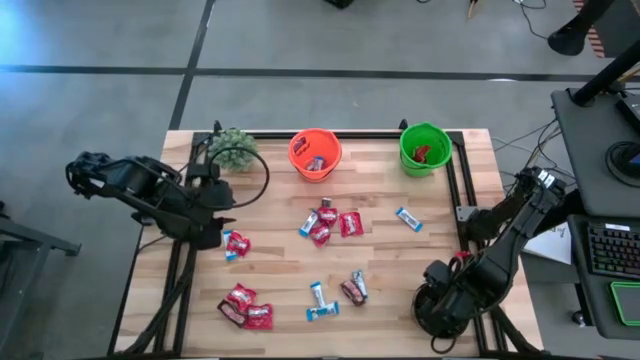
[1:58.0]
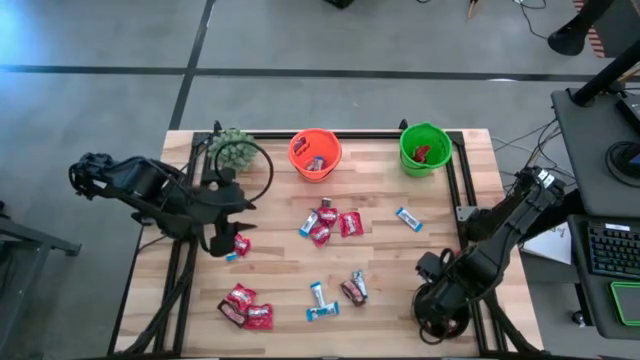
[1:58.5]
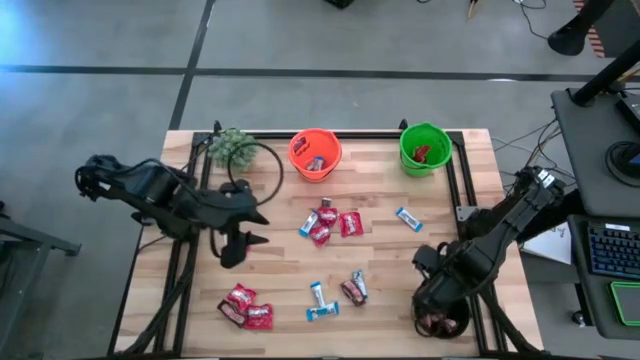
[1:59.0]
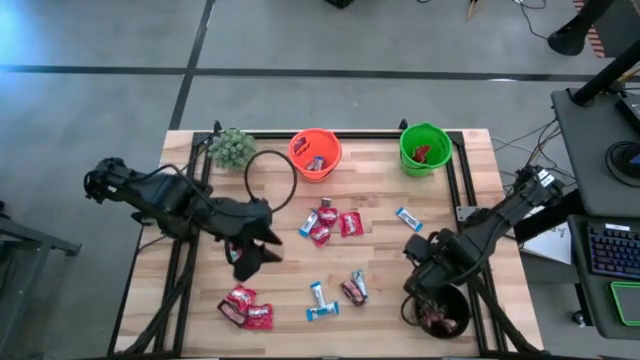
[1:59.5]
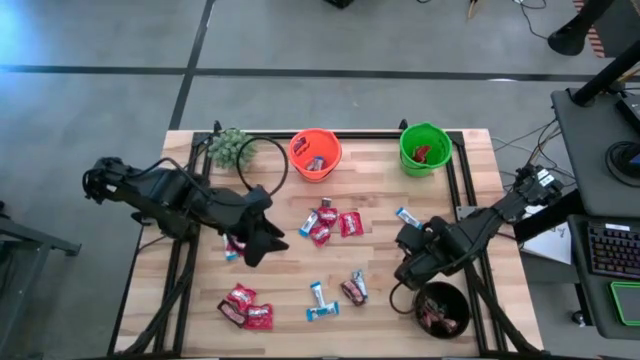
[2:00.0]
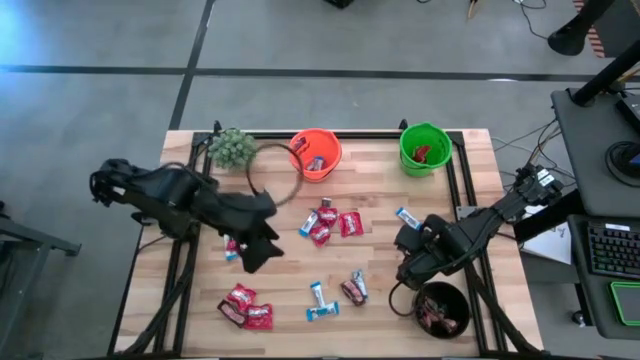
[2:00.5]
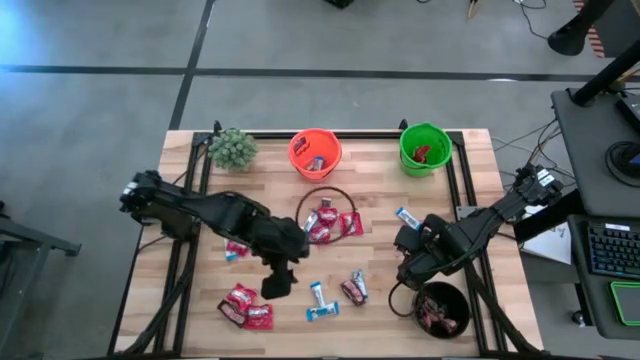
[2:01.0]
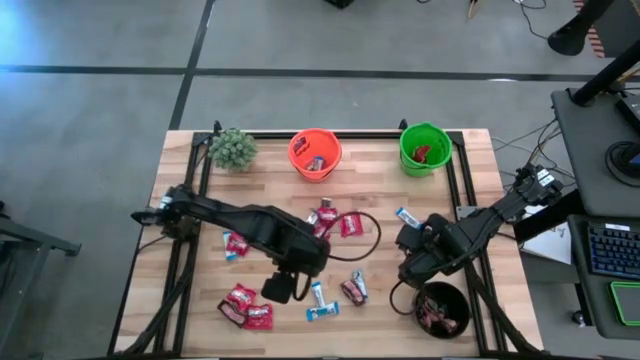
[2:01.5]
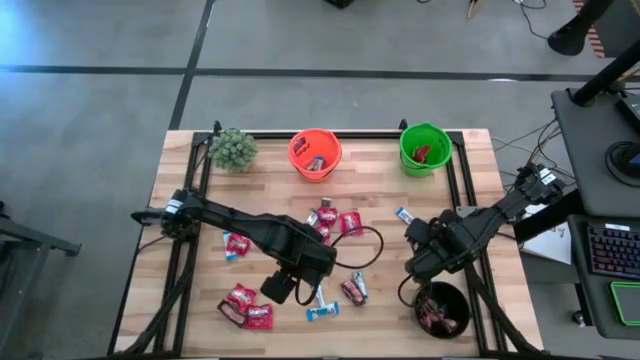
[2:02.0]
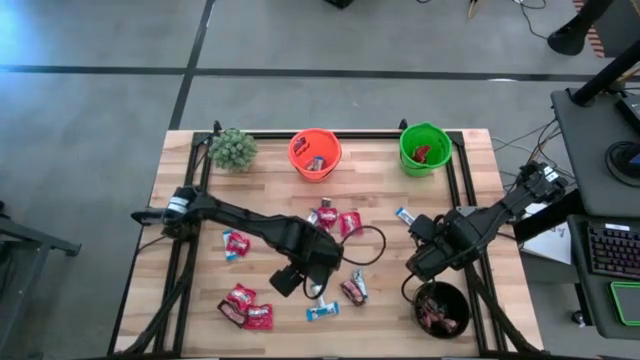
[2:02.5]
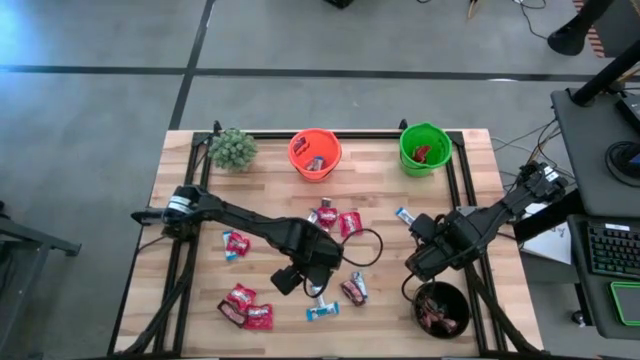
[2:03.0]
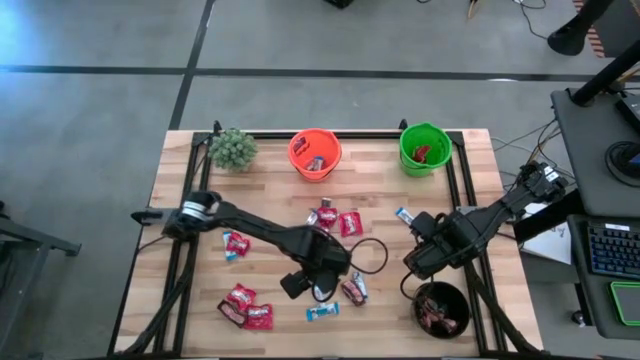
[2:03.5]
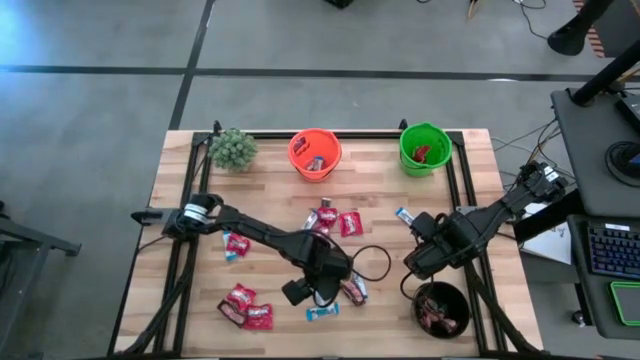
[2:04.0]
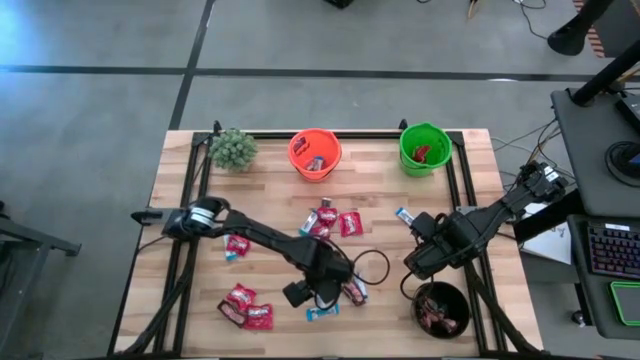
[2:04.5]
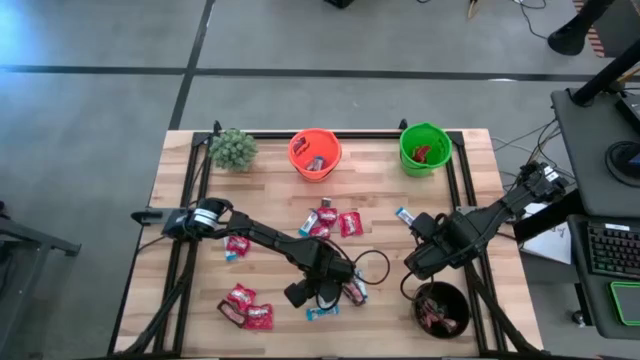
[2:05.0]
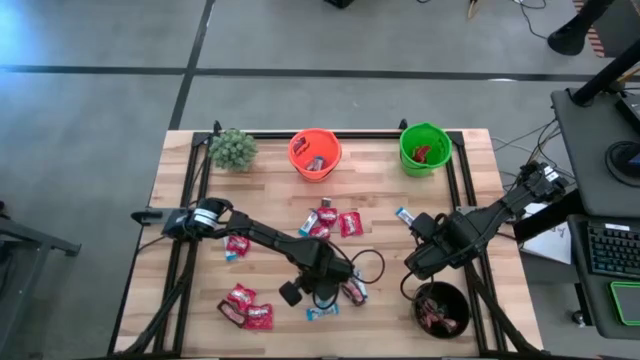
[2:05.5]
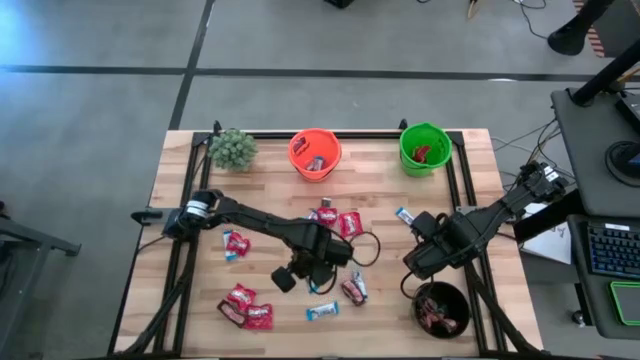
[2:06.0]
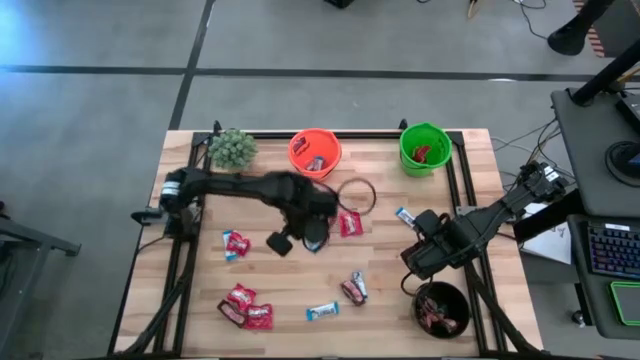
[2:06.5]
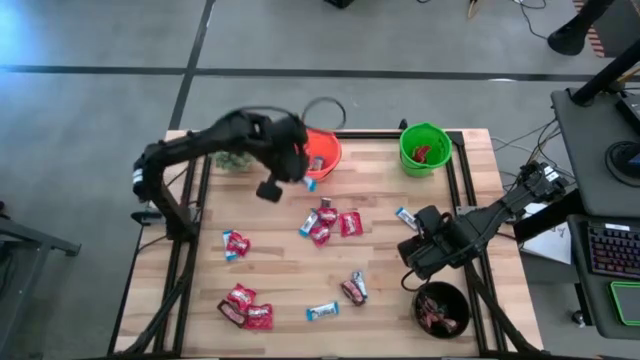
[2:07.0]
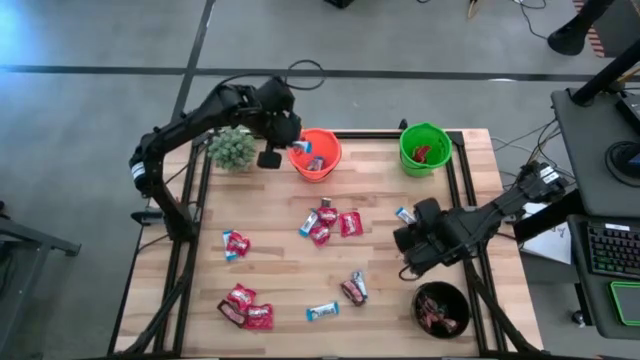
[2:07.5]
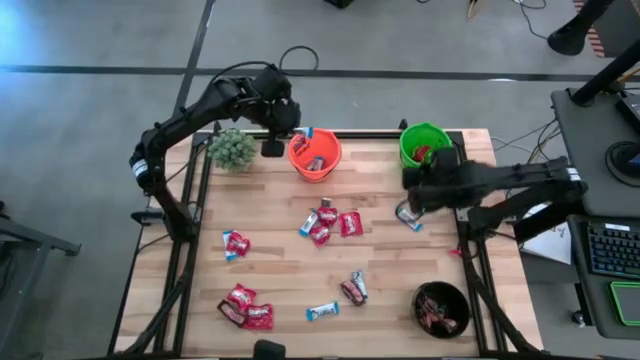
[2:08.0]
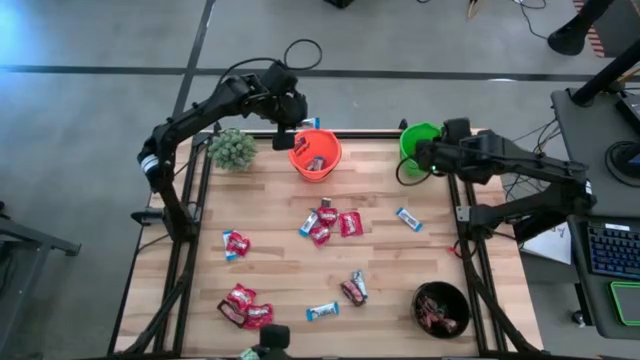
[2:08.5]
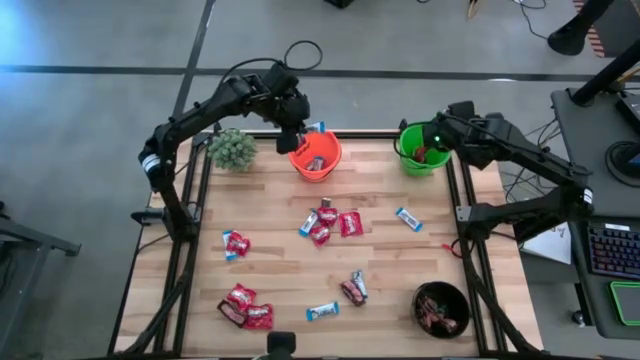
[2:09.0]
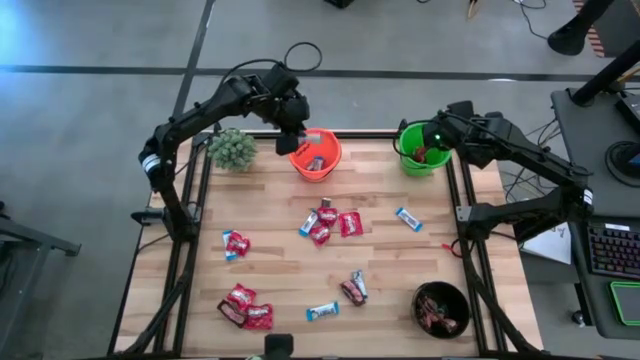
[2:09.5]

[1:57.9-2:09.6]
Task: Sort candy
Put the white chocolate into the orange bucket

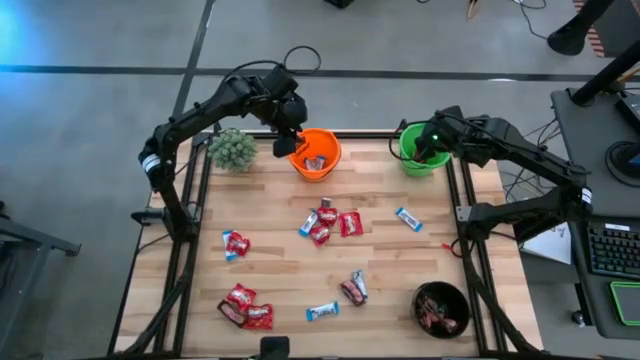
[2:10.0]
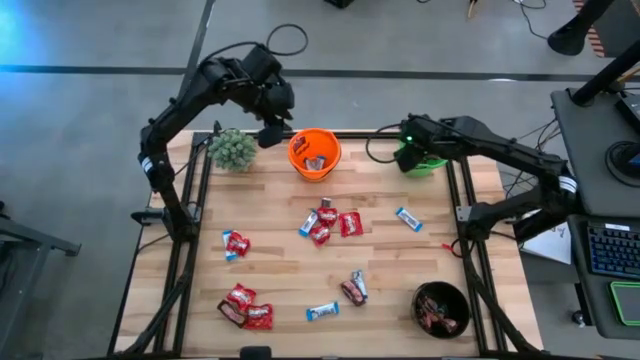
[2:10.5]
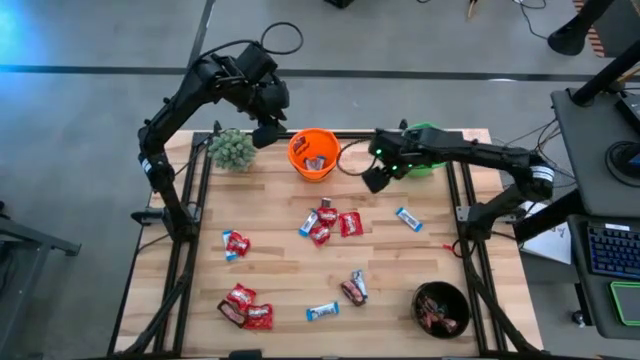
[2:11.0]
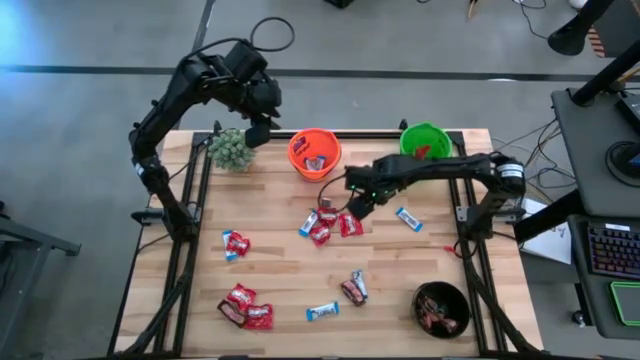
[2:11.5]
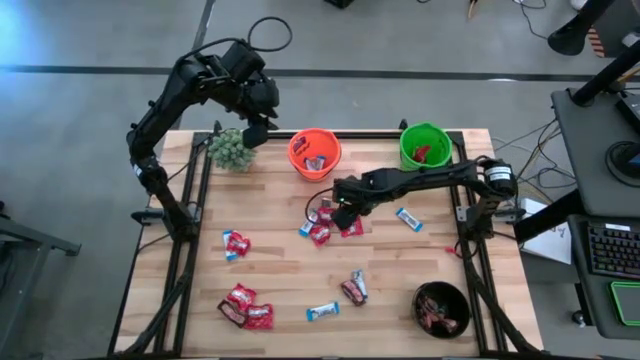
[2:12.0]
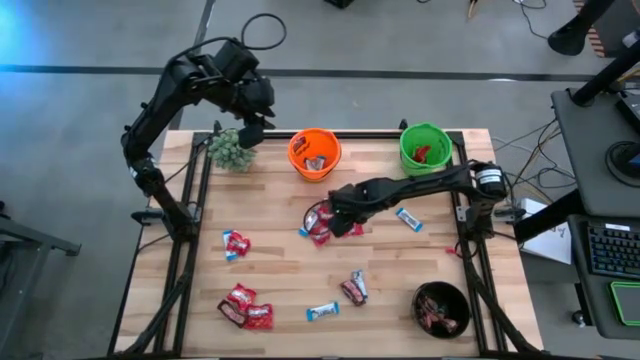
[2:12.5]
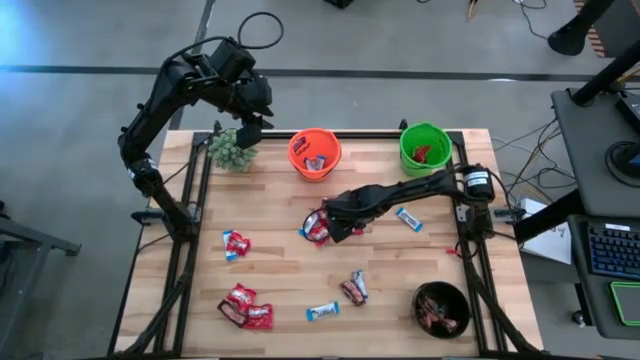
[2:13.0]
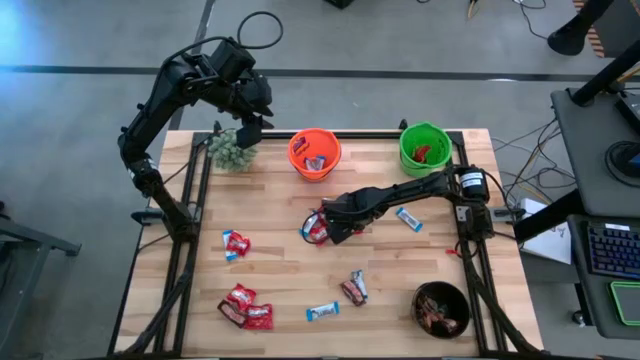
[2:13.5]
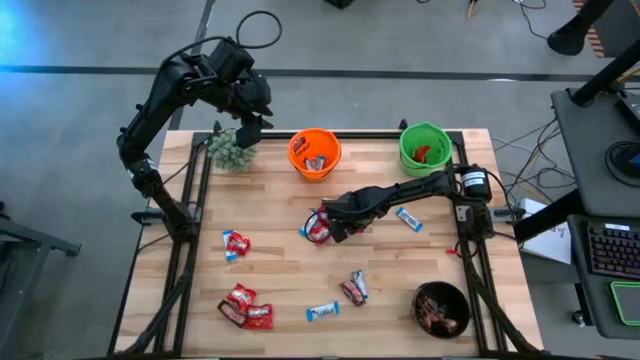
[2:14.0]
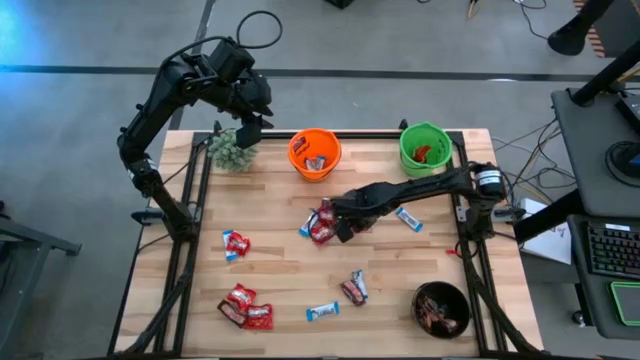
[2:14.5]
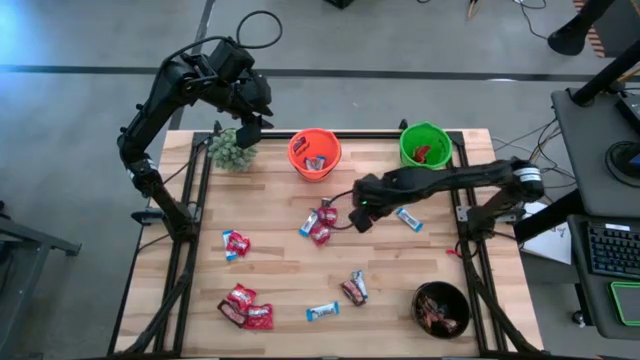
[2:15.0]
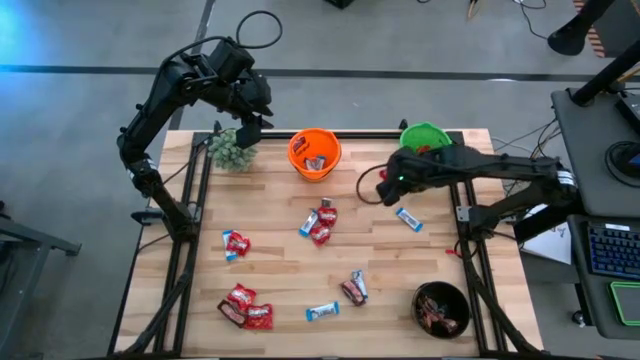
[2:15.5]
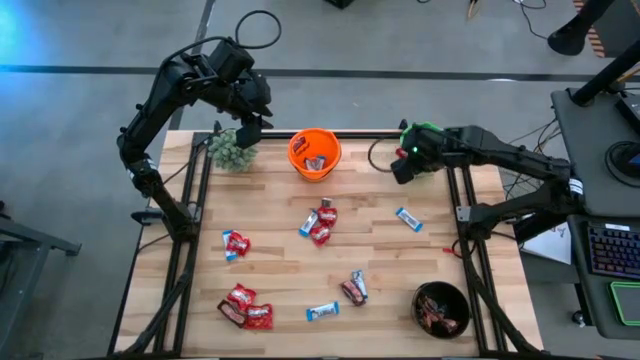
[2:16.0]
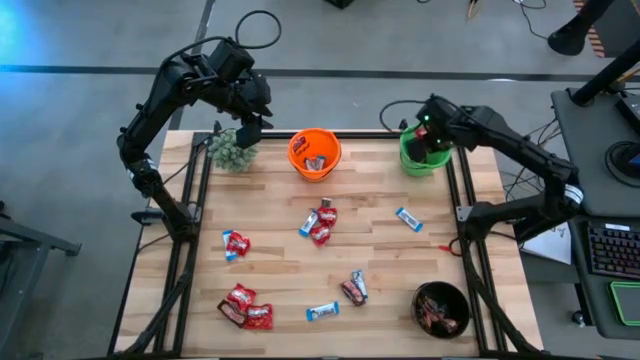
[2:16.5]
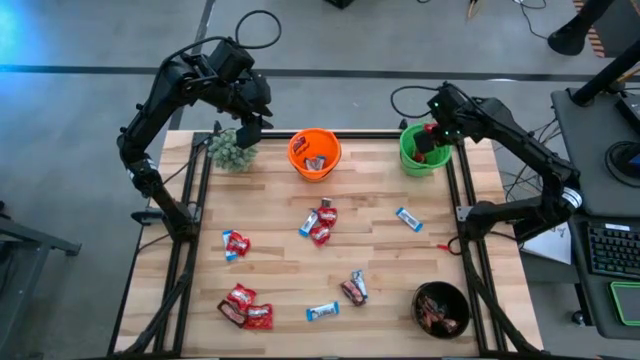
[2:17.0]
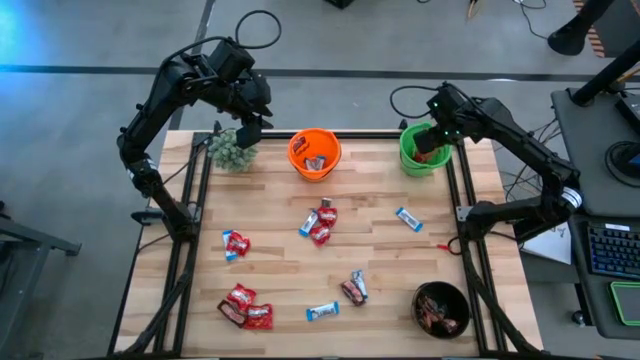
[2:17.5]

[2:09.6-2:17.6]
Put the red candy into the green bucket

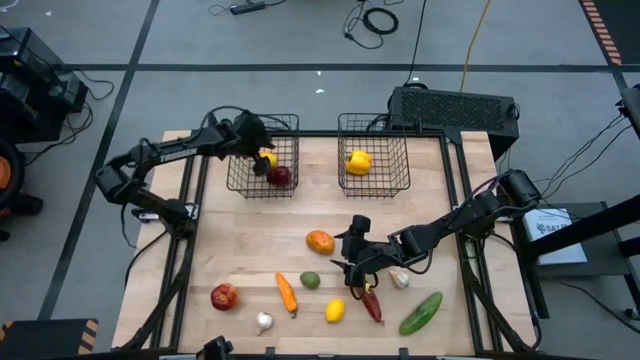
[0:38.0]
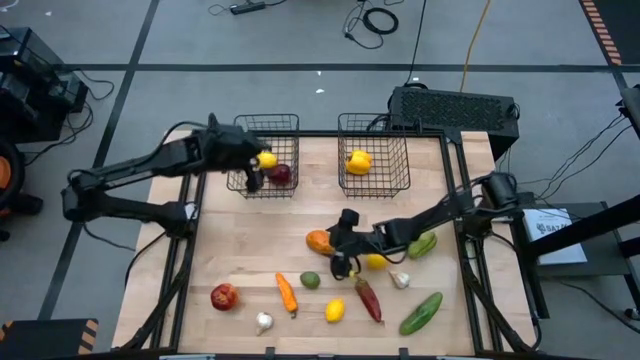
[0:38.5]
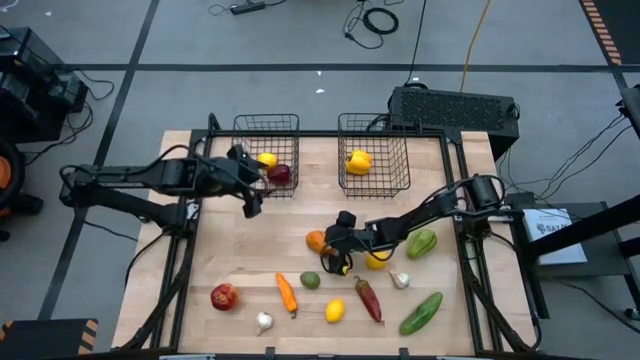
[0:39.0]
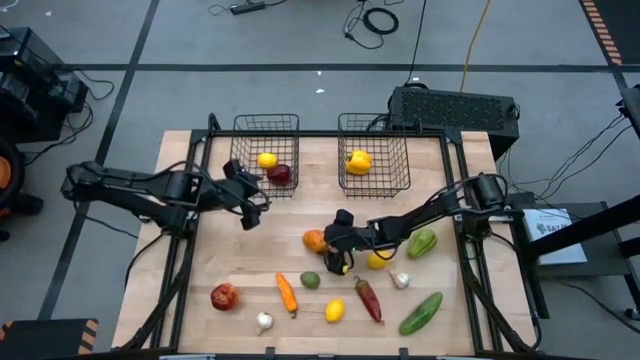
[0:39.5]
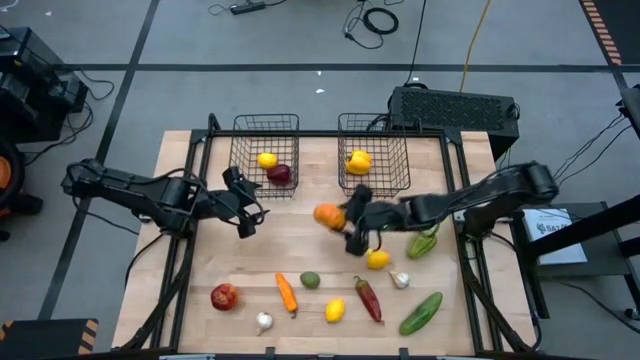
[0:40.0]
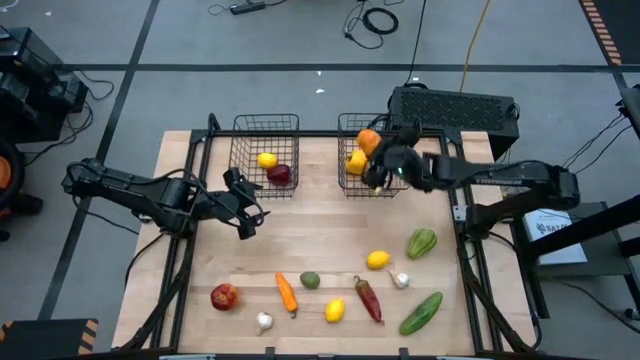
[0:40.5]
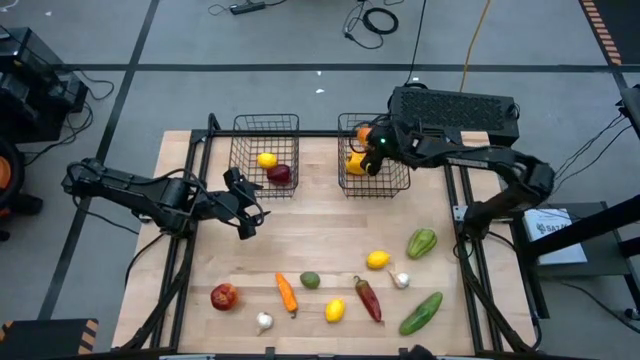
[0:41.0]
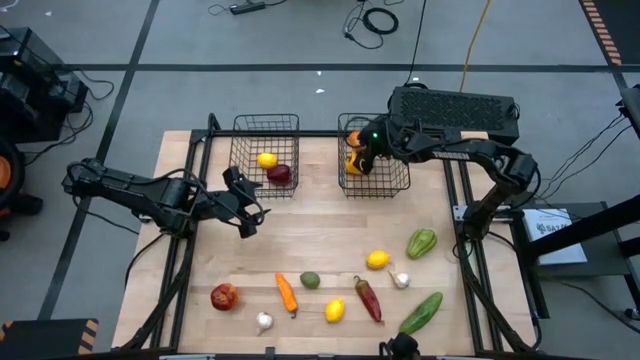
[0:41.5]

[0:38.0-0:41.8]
Task: Sort produce into baskets
Put the brown potato into the right mesh basket
